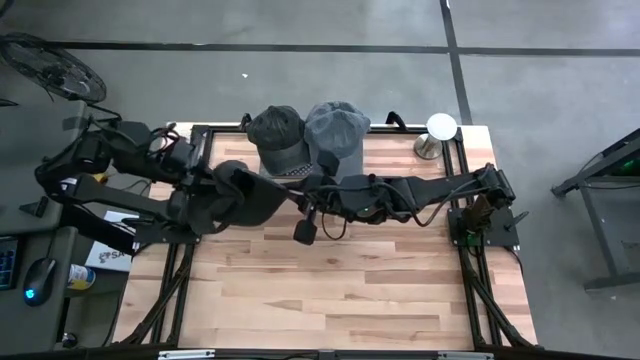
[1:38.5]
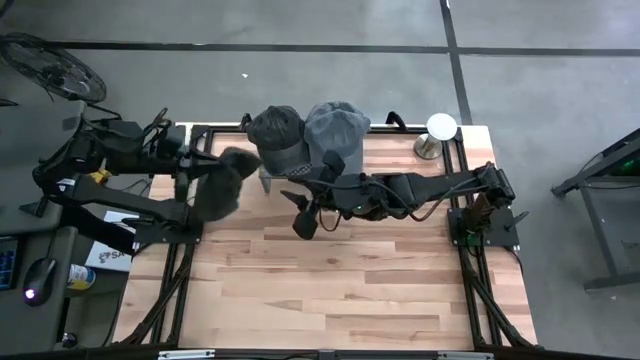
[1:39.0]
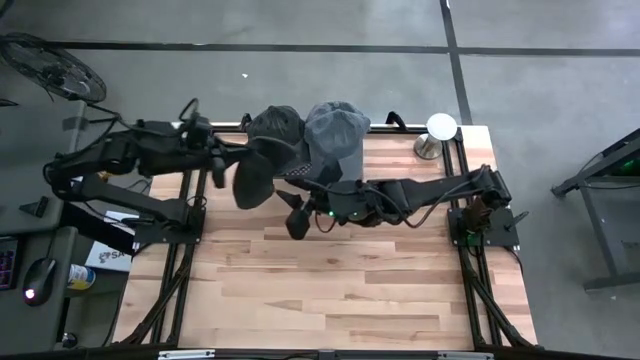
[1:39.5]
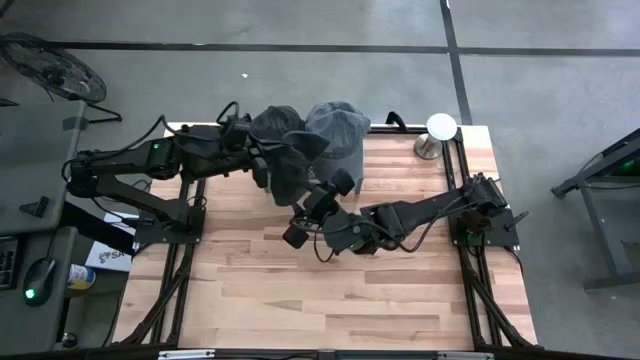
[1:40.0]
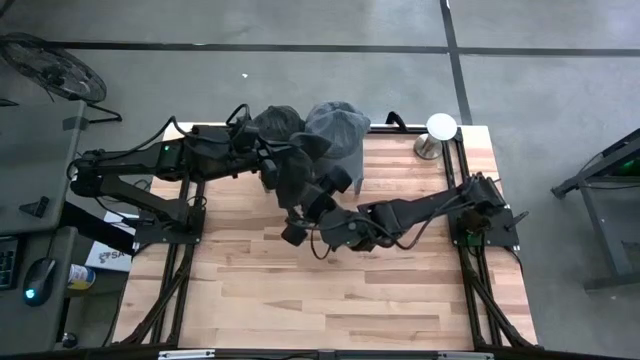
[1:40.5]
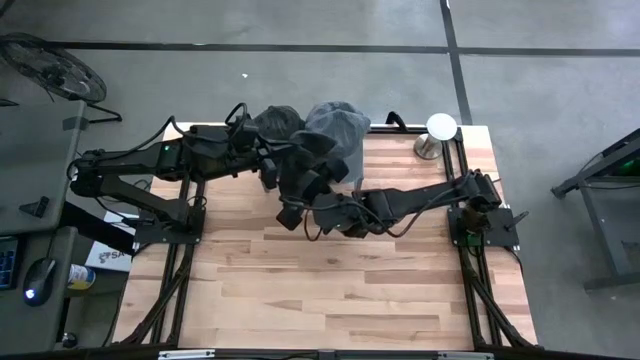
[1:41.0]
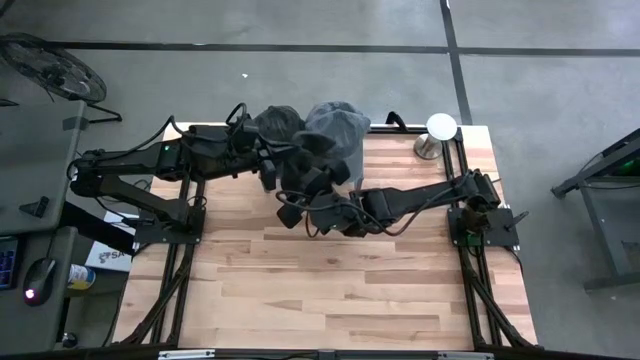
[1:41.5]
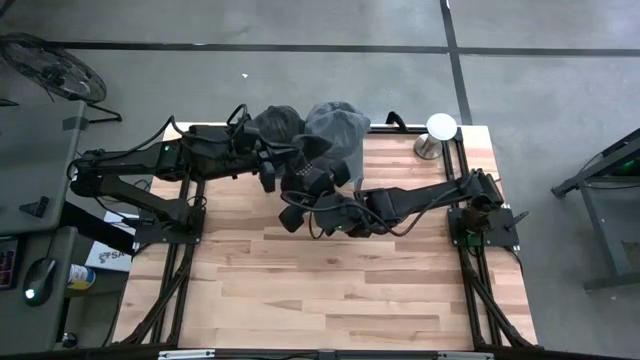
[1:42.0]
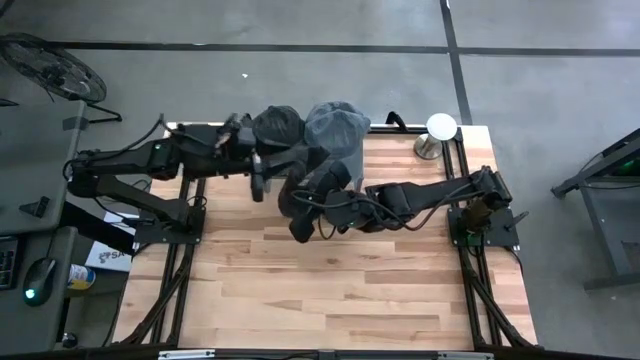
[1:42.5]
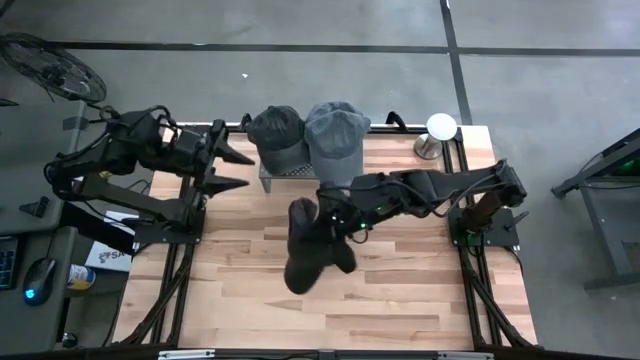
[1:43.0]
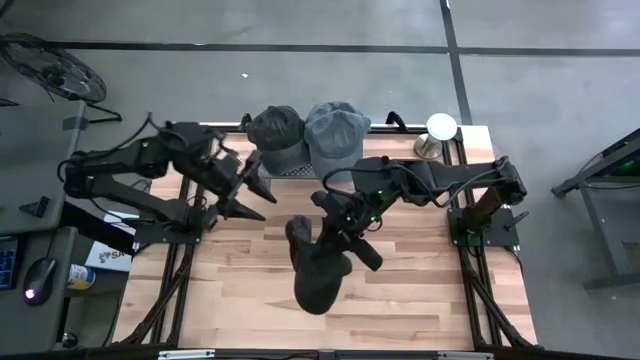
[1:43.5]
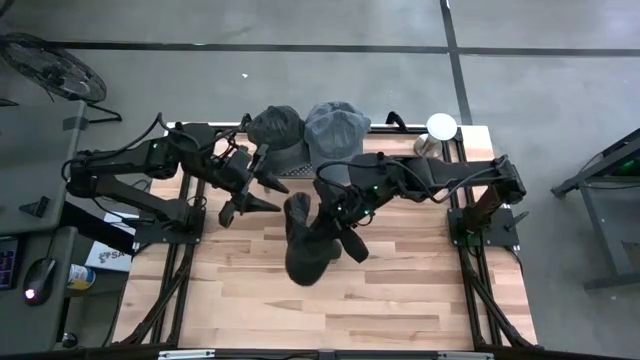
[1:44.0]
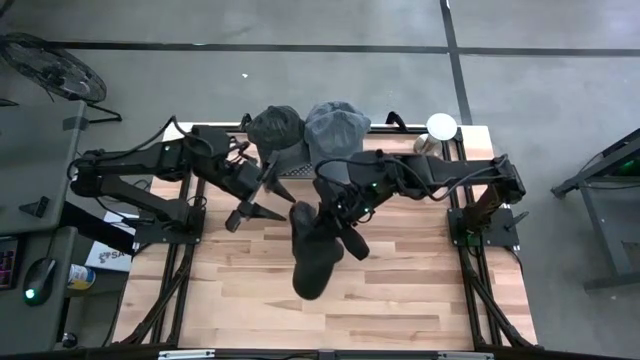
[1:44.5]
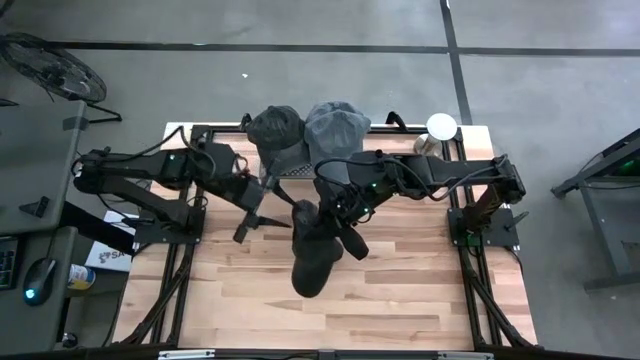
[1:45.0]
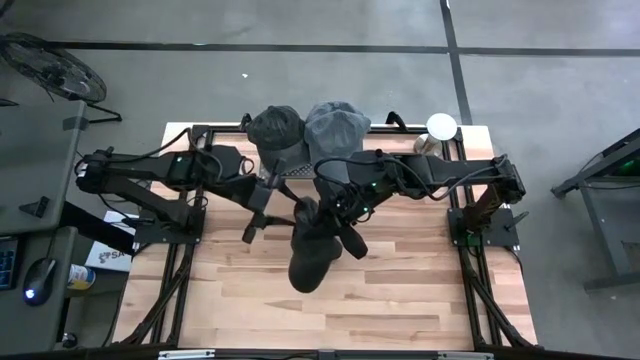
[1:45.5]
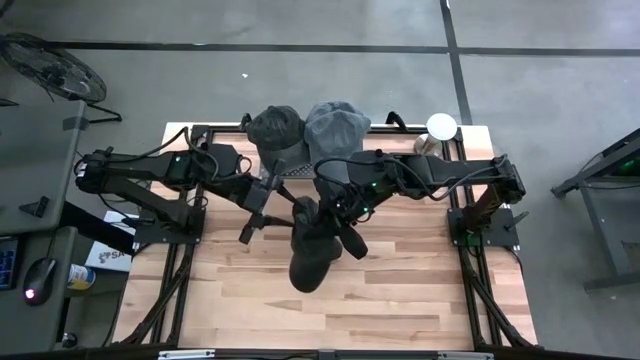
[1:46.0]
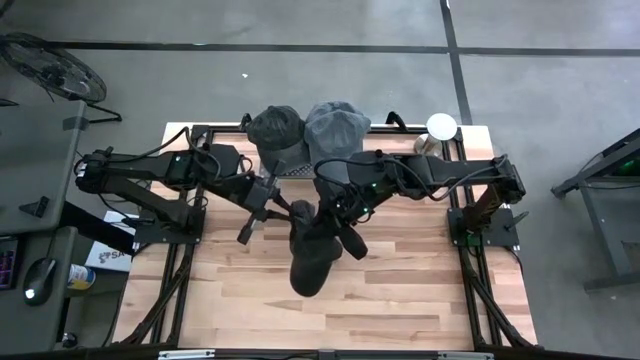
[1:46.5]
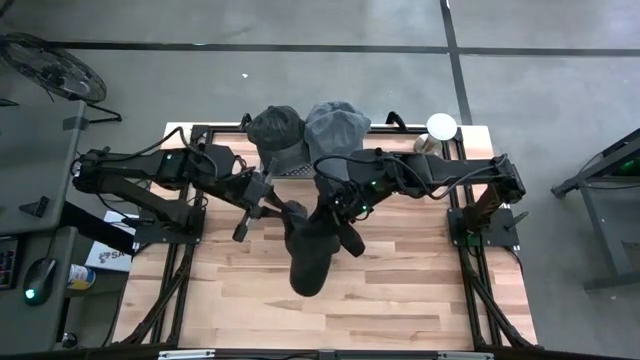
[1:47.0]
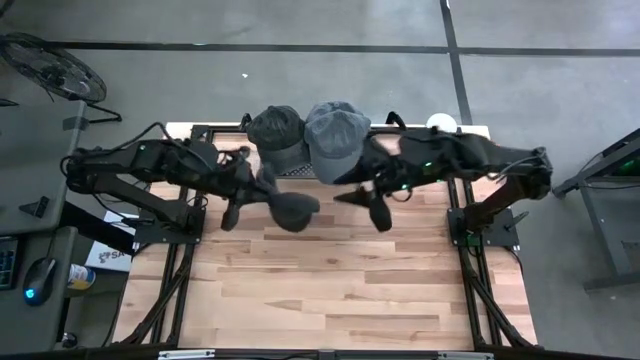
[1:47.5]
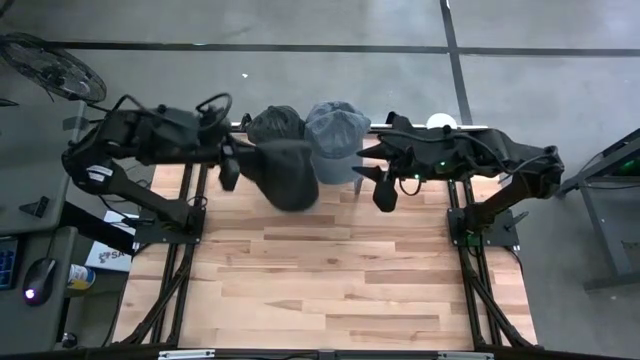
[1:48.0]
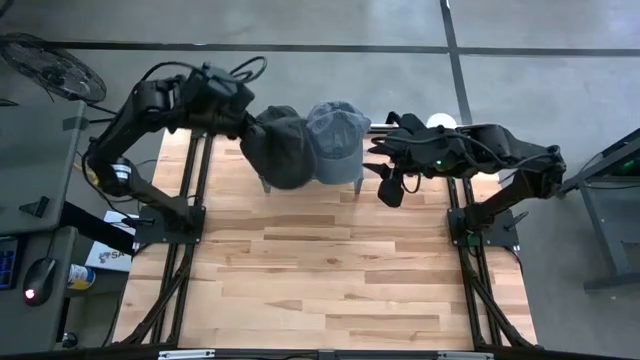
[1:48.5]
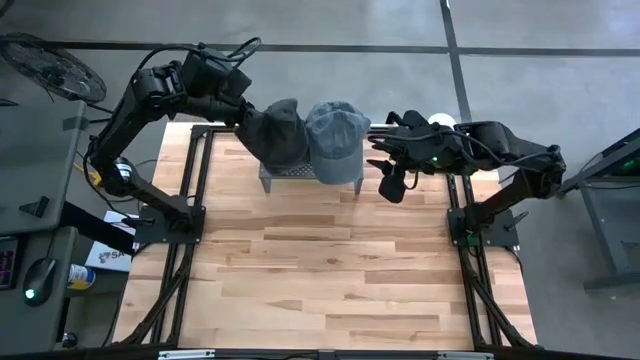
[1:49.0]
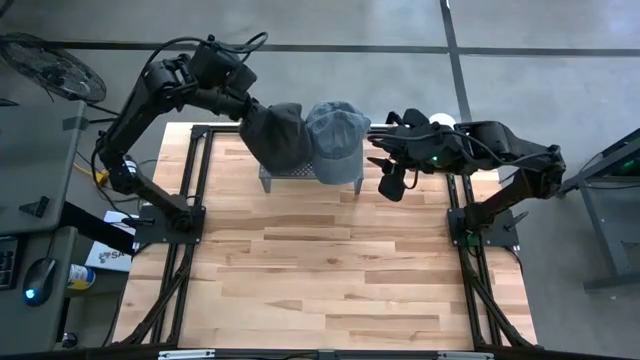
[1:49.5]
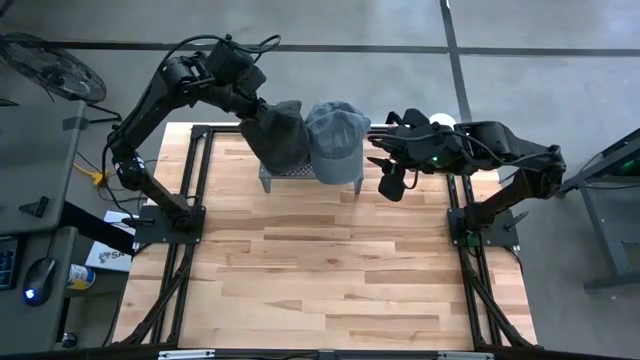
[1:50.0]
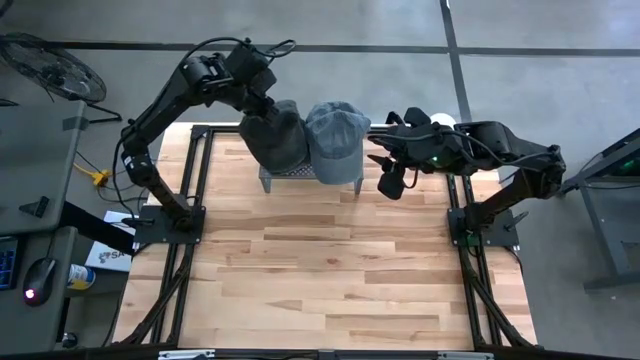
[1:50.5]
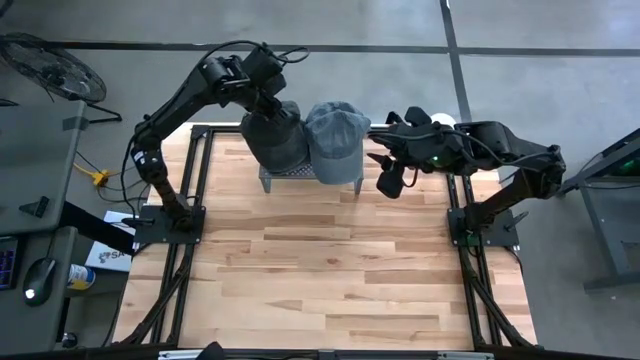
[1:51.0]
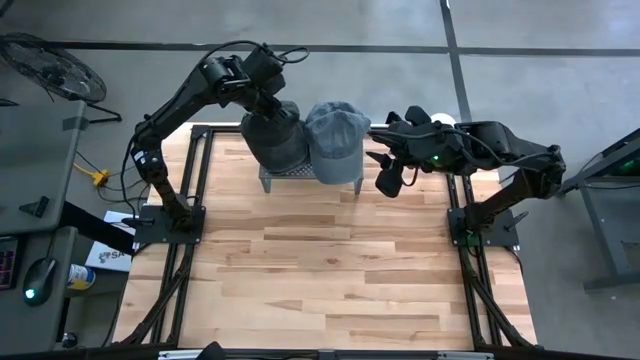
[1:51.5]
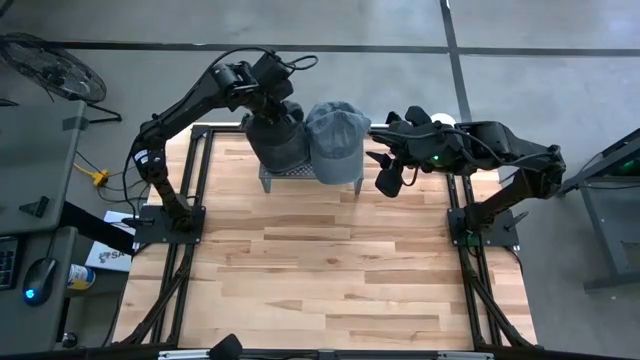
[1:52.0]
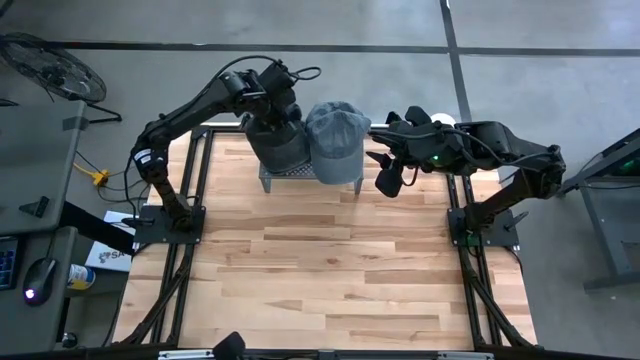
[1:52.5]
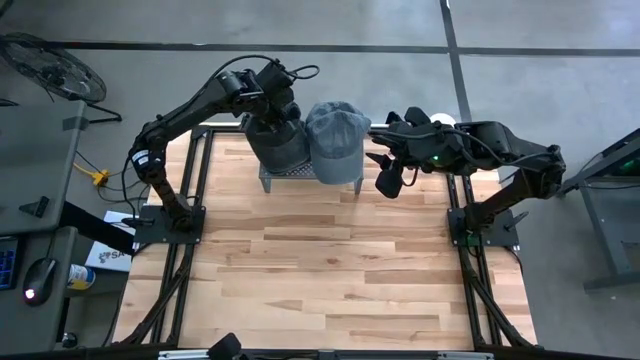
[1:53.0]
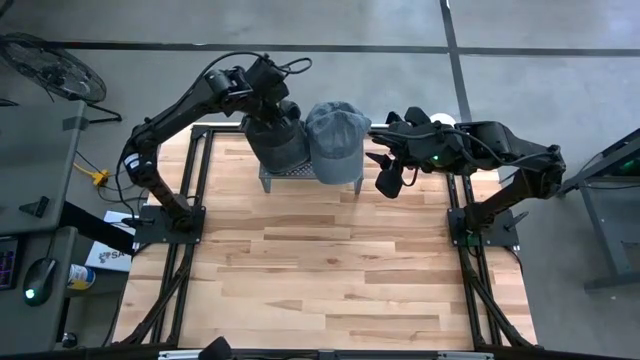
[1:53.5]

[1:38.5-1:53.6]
Task: Pick & Place hat
Stack the black cap on top of the black cap on the shelf

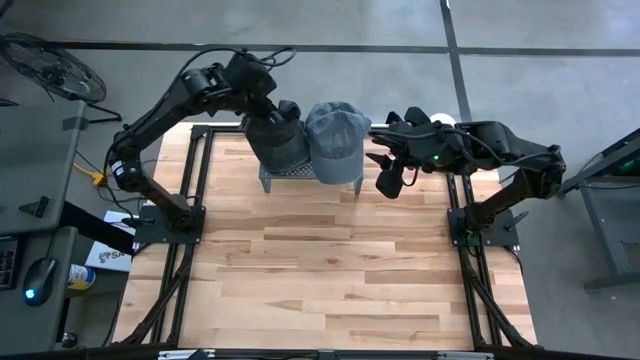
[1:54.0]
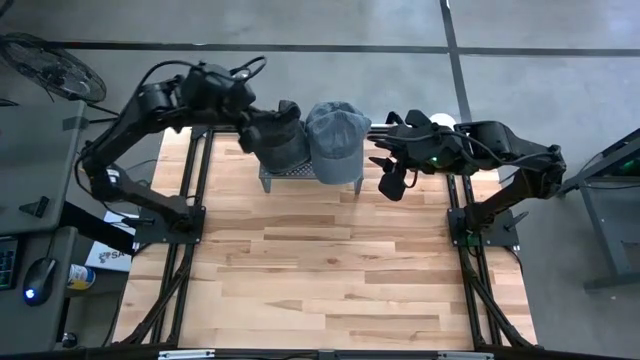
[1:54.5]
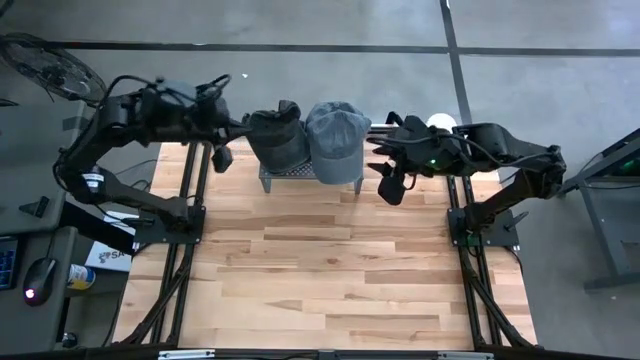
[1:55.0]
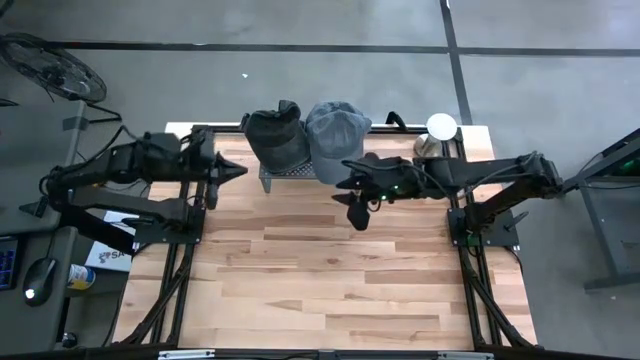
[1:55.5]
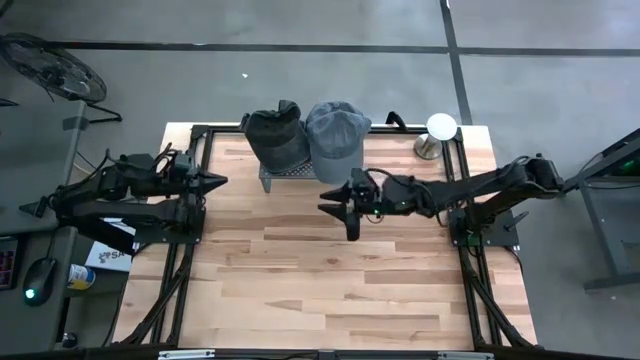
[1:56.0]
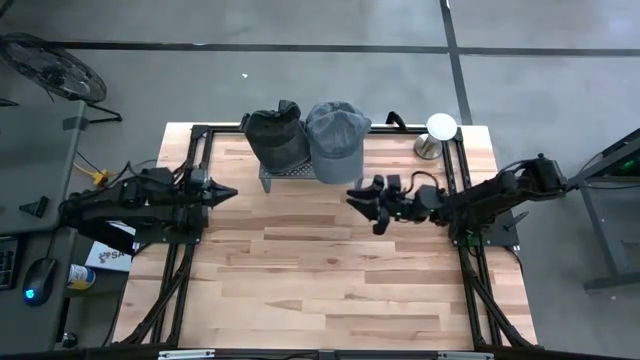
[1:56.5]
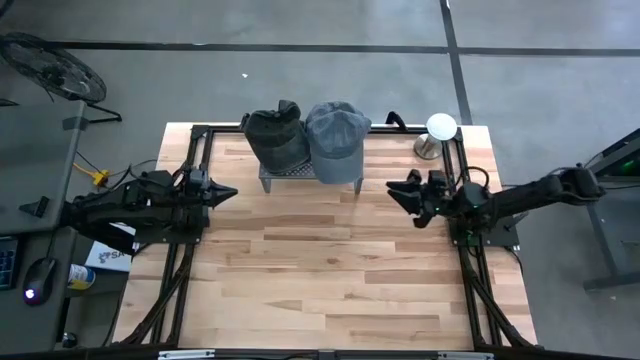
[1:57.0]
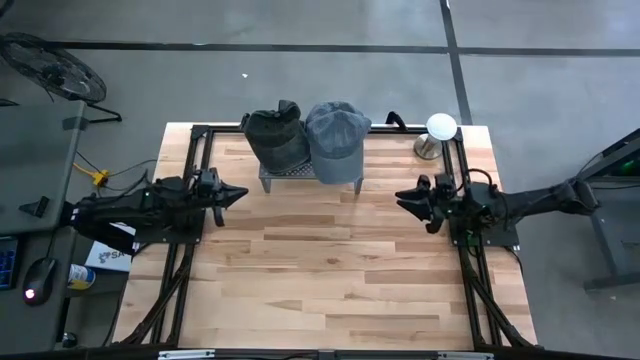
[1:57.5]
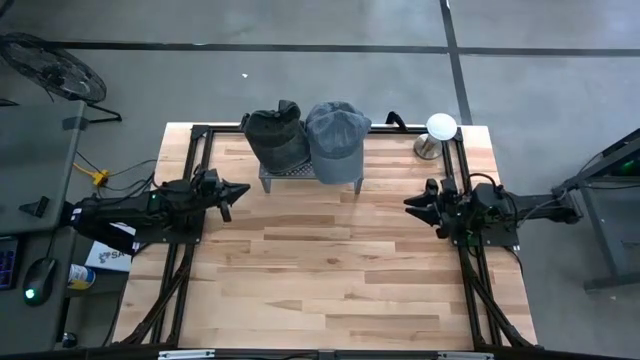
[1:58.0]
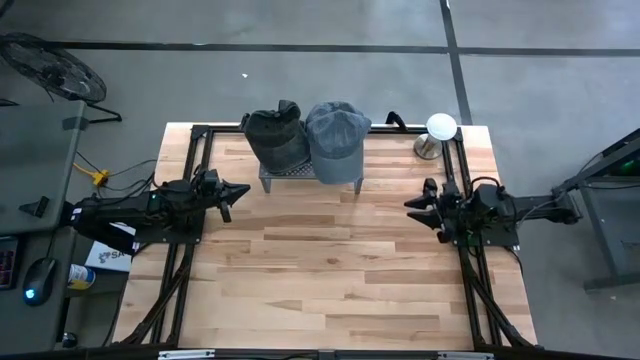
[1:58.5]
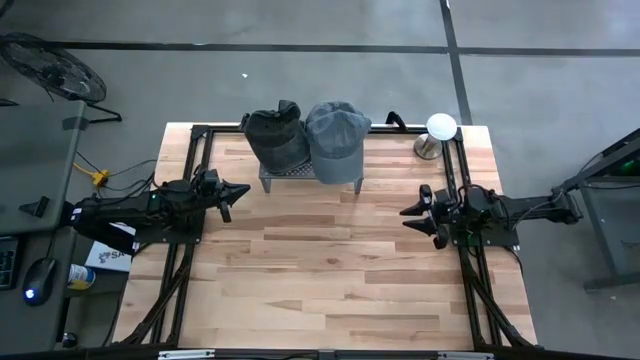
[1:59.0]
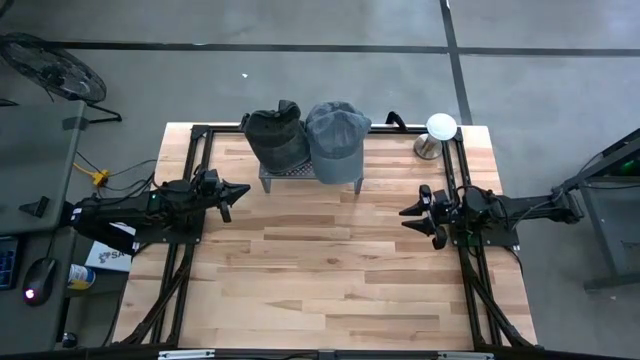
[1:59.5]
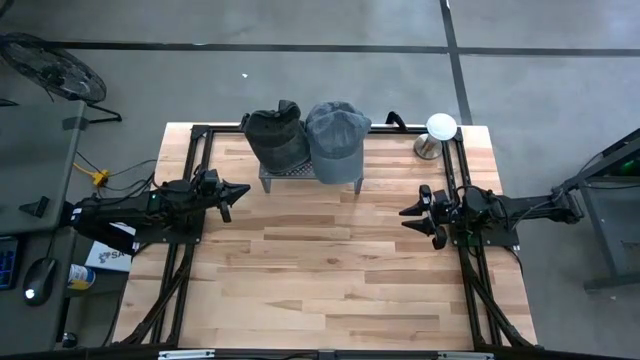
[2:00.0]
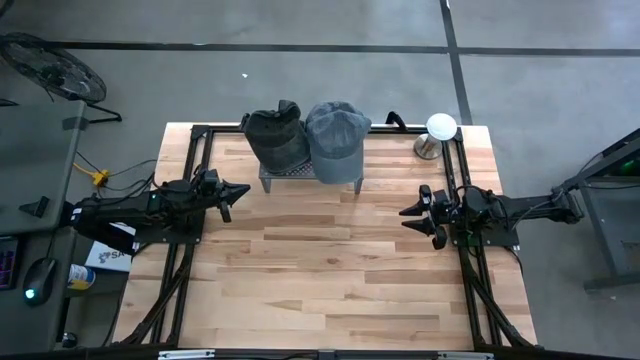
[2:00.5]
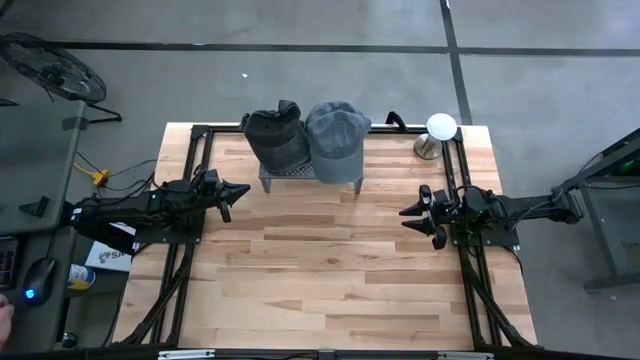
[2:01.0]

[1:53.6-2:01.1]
Return to Home Position
